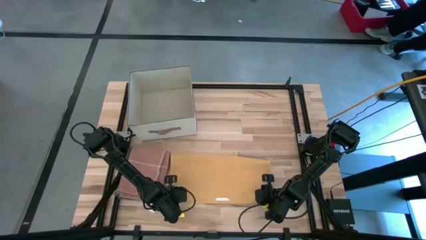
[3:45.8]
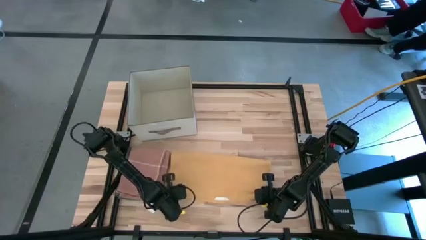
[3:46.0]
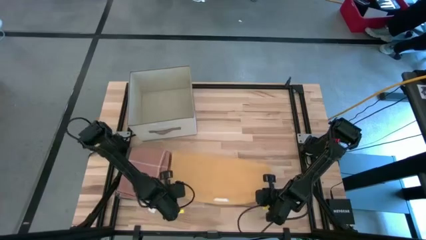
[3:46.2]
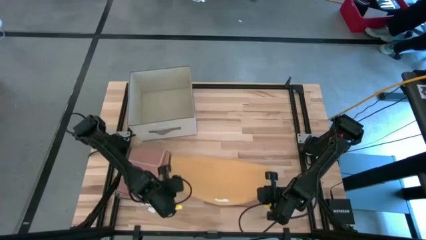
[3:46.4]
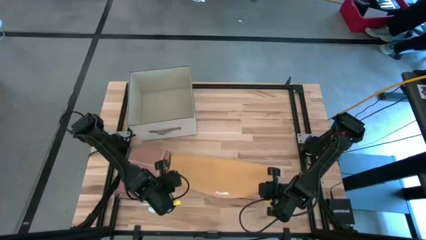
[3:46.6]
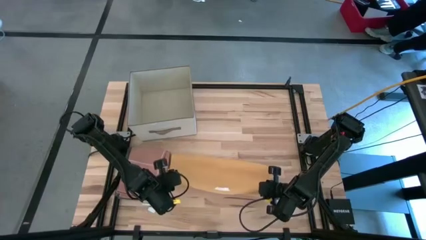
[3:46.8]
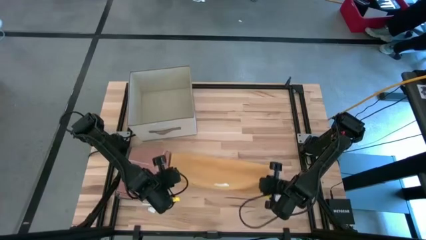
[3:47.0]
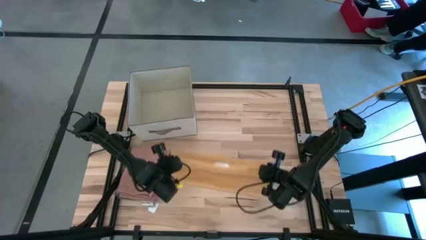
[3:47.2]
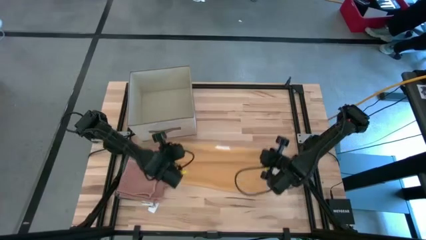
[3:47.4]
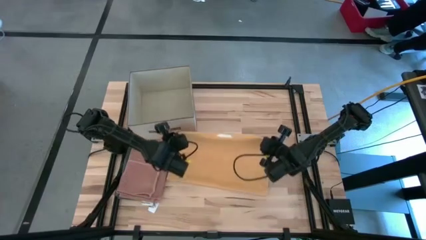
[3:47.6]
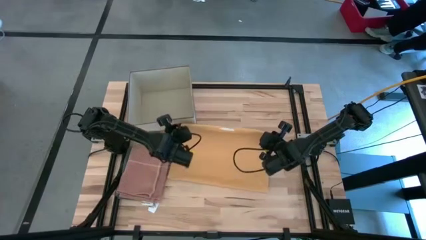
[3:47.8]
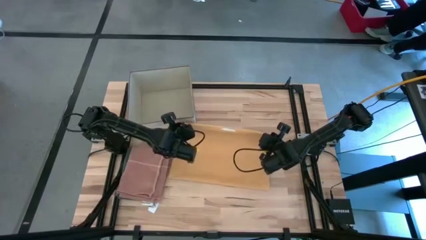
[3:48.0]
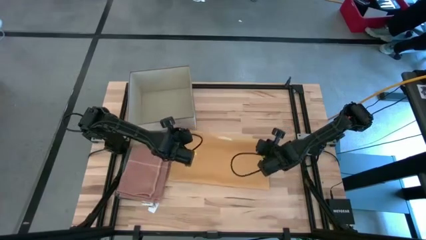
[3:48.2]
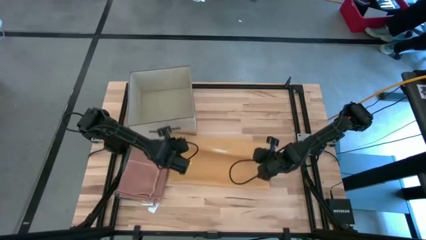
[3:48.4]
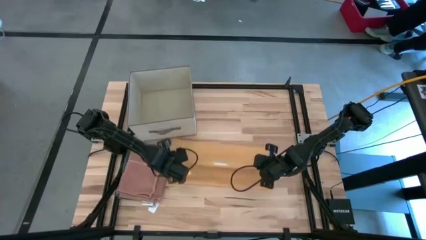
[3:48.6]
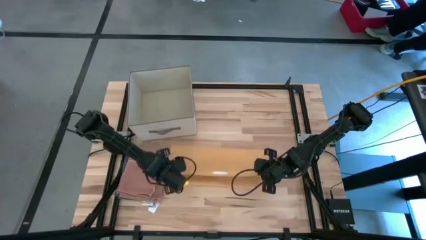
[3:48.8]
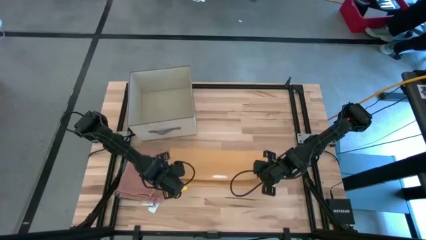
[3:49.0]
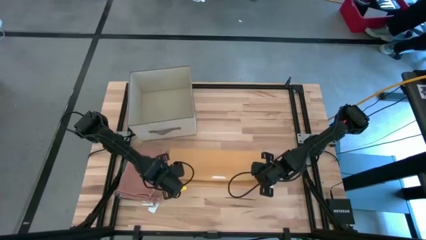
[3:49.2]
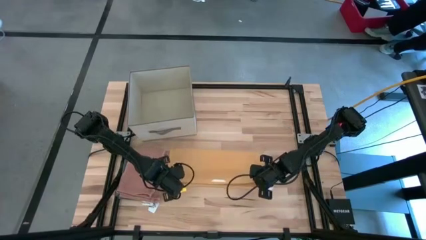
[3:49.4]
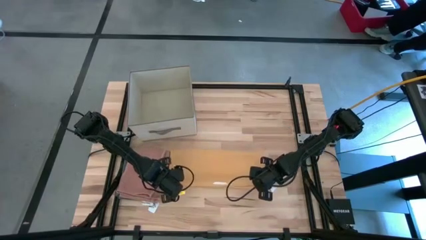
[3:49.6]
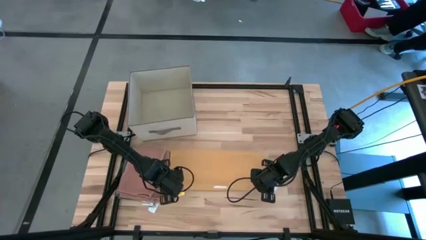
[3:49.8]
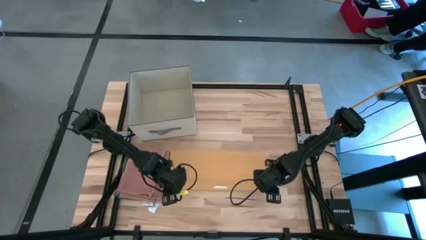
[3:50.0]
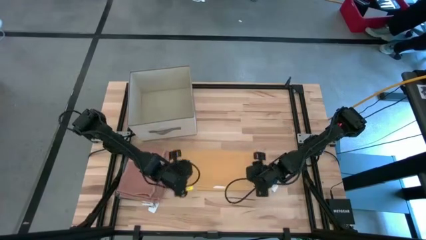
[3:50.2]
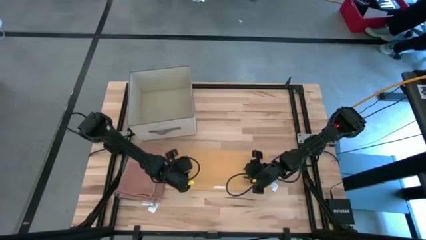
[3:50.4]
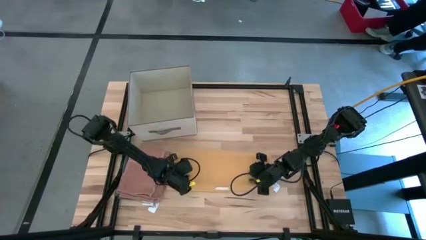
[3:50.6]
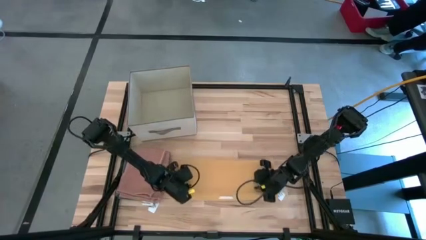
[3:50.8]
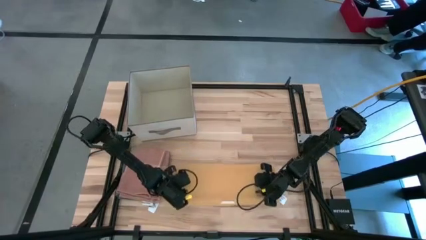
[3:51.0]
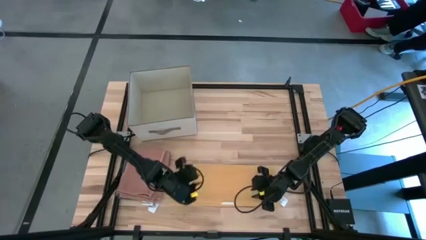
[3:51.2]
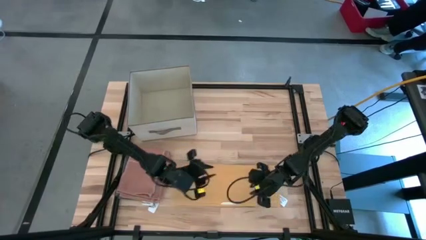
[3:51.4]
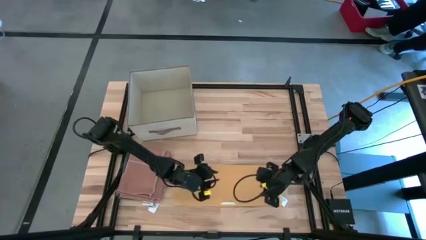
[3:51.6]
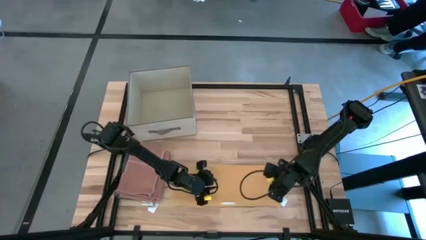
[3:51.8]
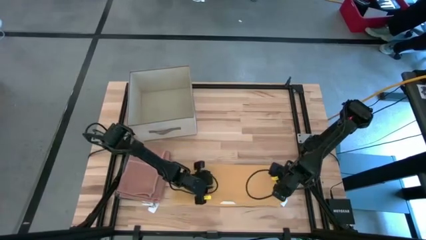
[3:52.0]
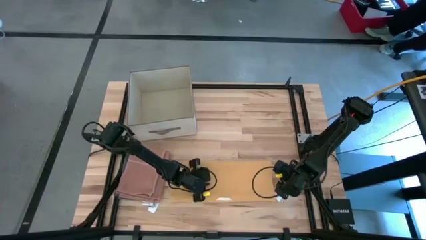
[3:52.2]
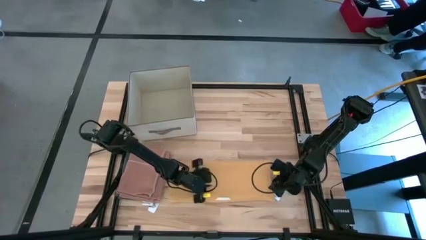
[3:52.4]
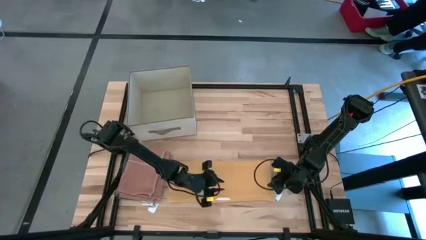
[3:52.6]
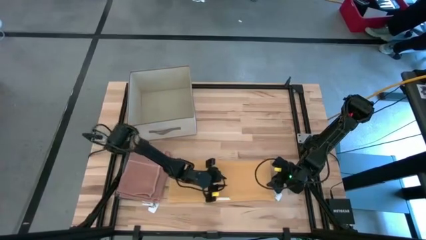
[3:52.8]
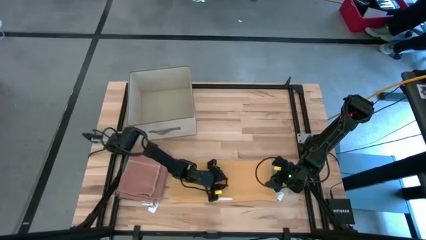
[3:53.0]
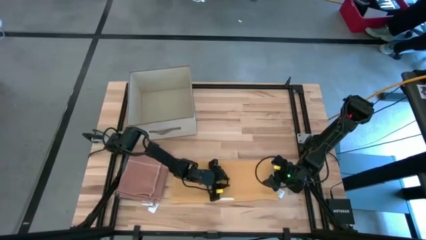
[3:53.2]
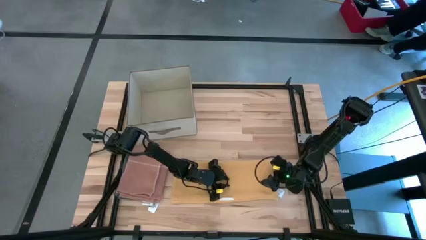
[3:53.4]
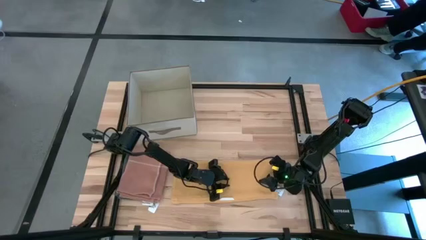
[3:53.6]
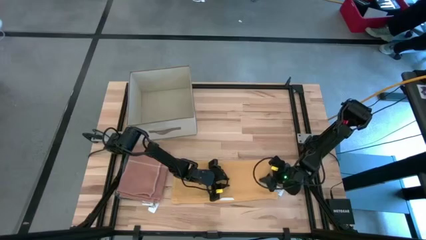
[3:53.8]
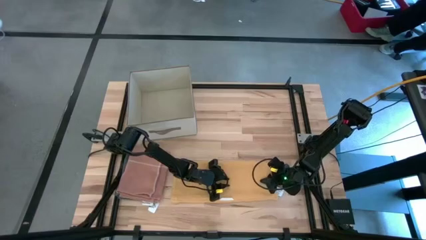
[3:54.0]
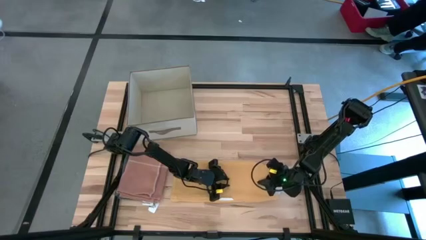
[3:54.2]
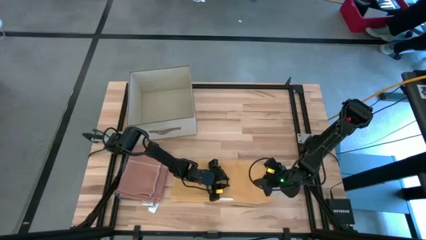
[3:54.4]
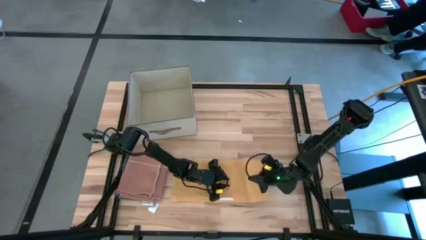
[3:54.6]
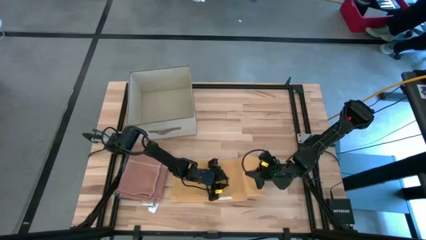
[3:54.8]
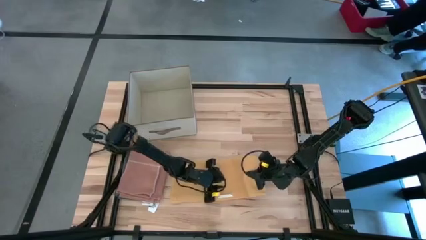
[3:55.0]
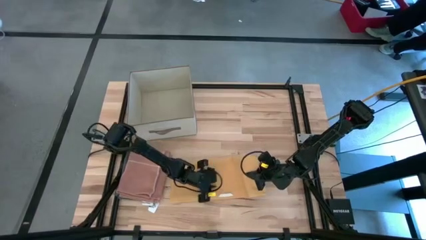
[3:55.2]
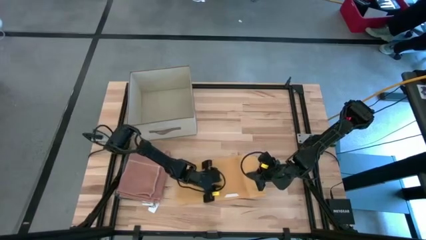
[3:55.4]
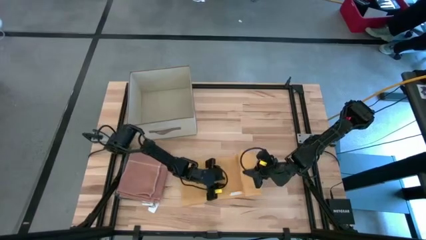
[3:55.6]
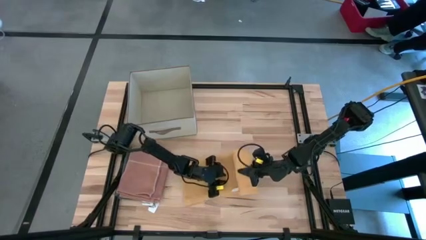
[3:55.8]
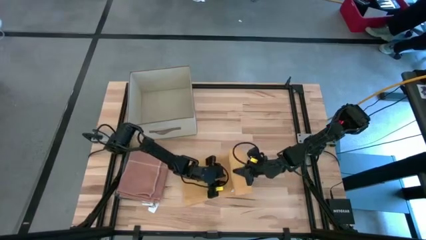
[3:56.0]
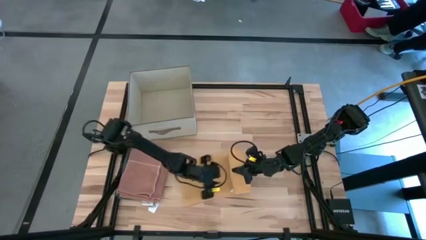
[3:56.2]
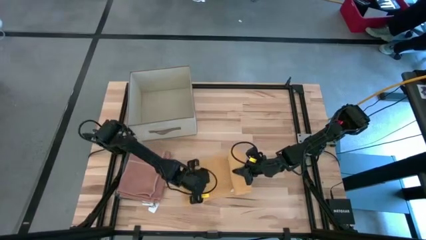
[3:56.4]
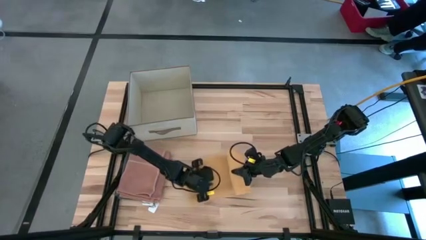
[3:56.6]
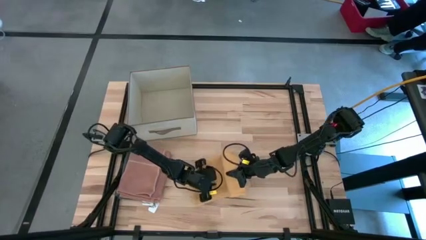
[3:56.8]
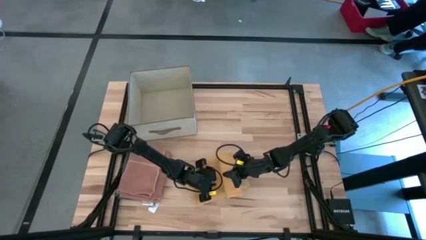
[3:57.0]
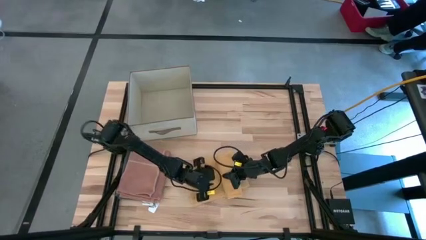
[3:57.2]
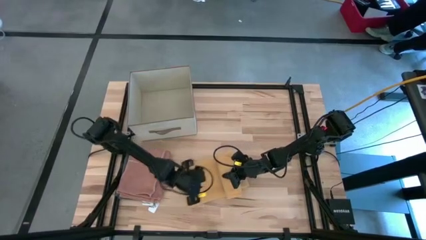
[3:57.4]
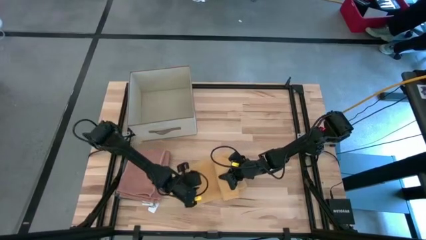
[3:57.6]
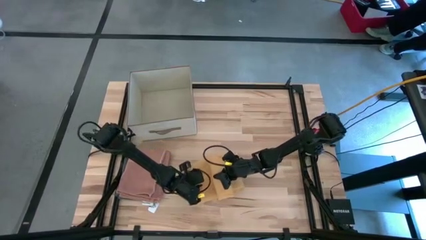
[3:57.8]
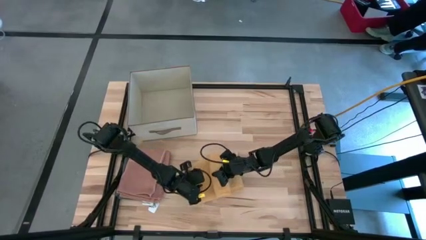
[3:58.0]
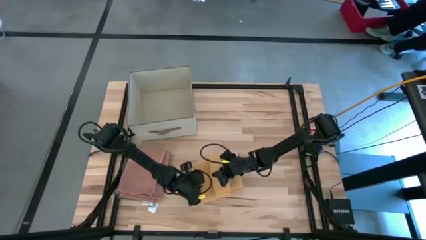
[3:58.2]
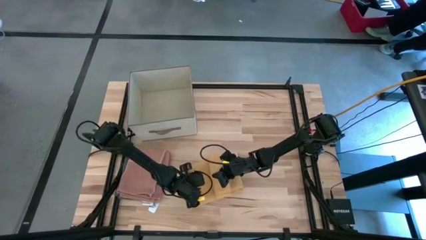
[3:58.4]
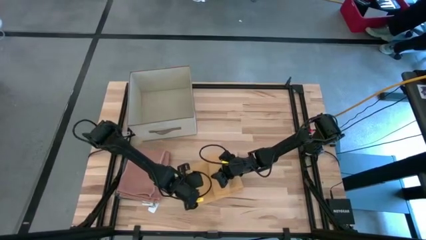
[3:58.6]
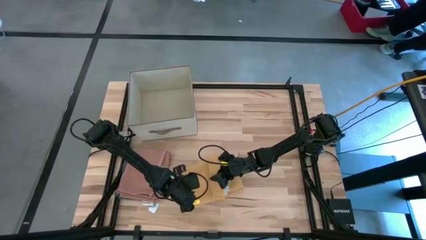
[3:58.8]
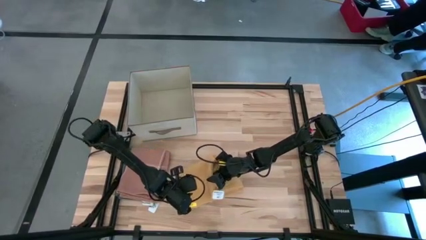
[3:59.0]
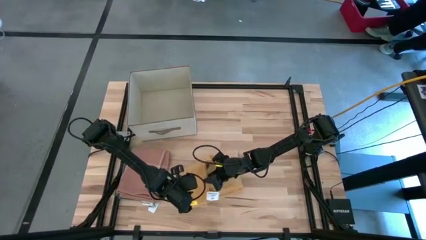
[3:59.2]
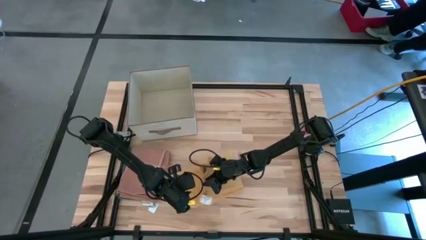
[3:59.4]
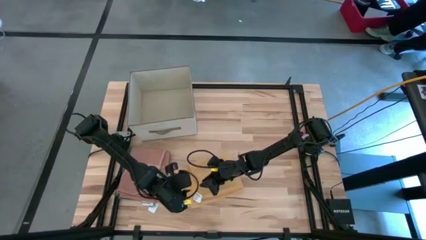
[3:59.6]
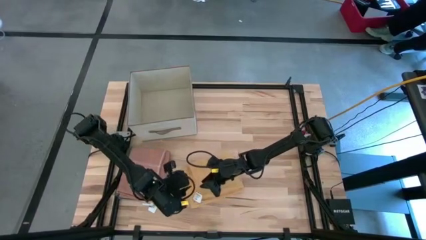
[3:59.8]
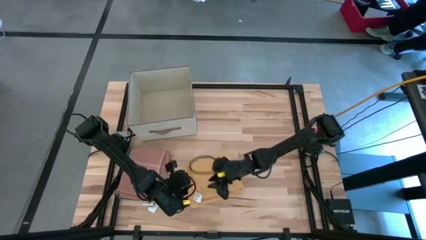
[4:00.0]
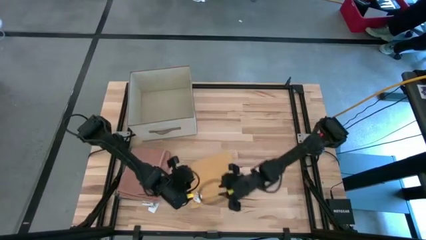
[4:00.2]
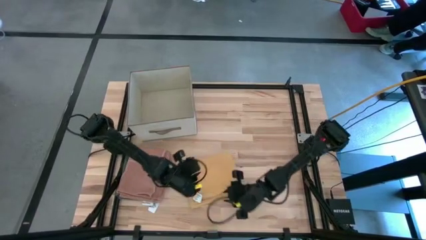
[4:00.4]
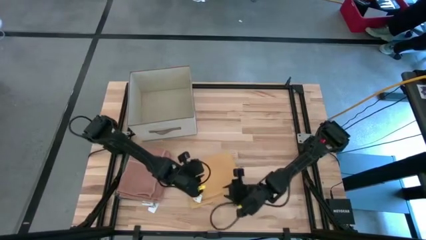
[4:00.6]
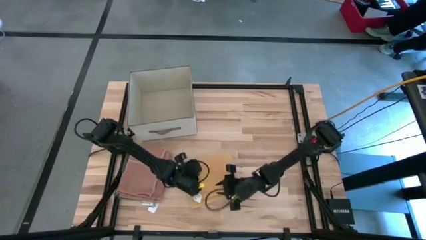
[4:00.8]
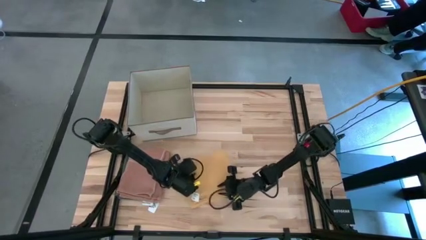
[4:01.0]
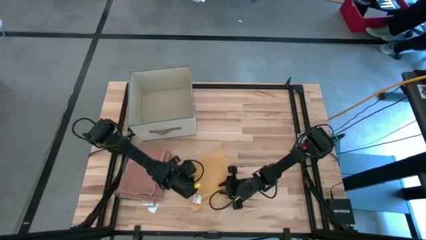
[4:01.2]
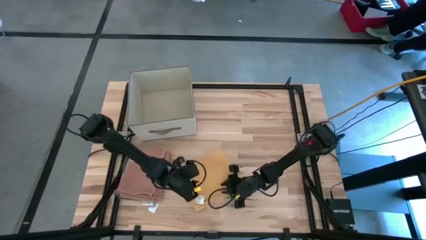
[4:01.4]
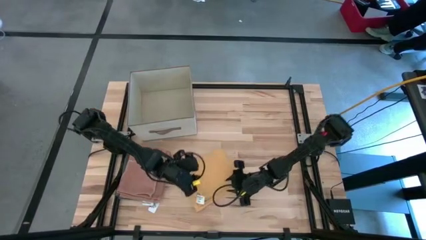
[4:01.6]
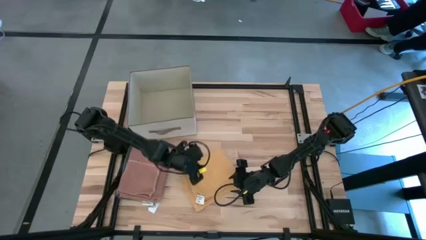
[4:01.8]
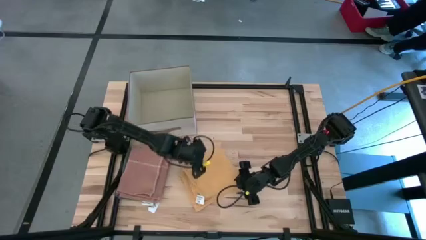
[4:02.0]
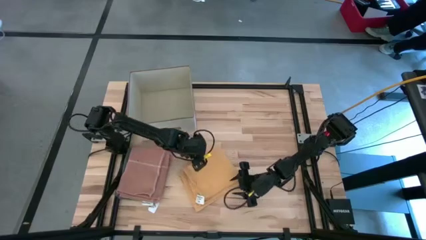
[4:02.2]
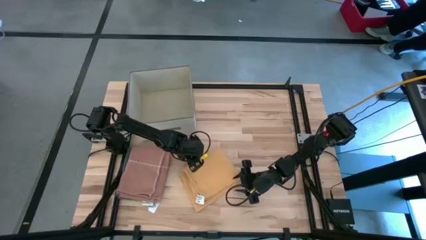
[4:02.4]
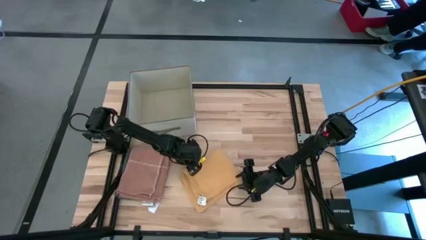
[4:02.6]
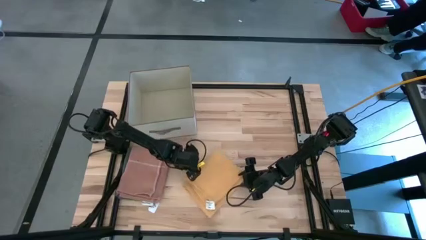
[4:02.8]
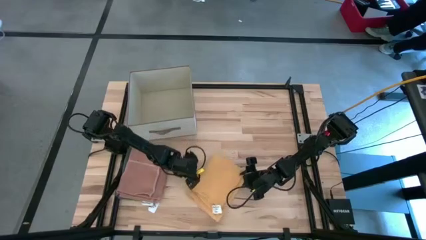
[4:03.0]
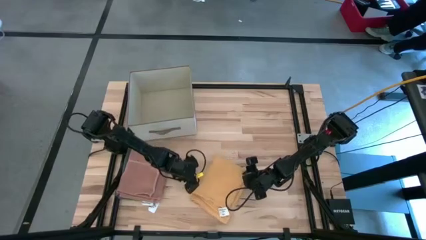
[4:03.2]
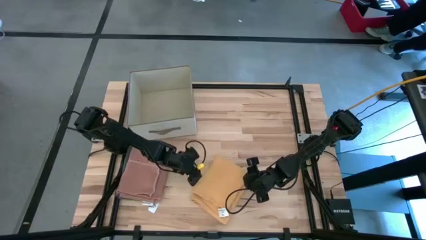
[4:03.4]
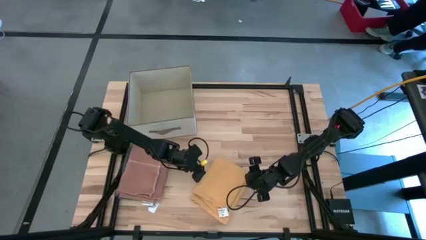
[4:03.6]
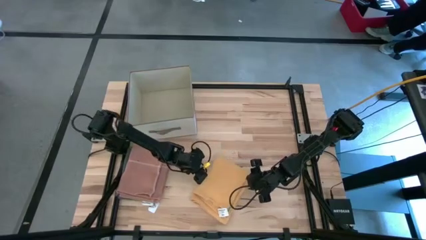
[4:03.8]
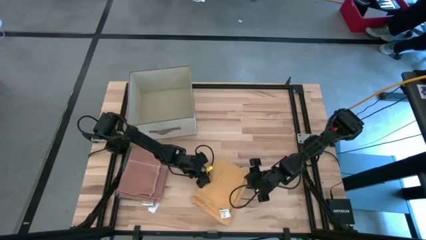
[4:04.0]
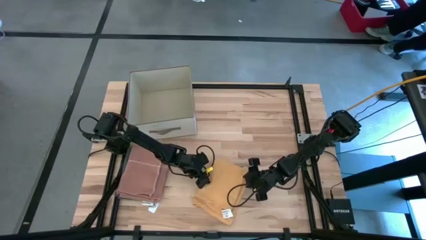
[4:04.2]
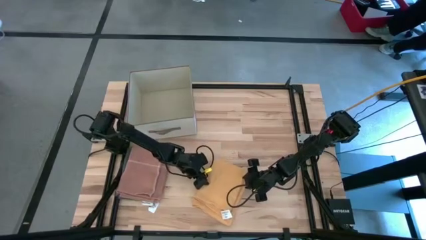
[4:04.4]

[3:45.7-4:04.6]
Task: Fold towel
Fold the yellow towel
